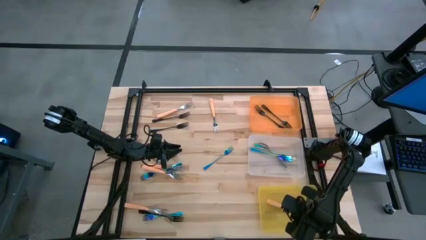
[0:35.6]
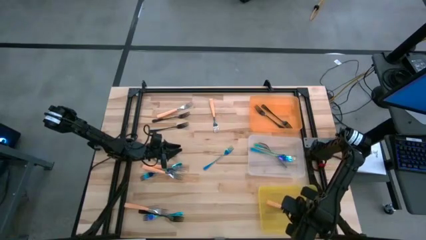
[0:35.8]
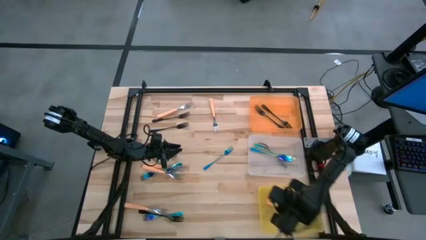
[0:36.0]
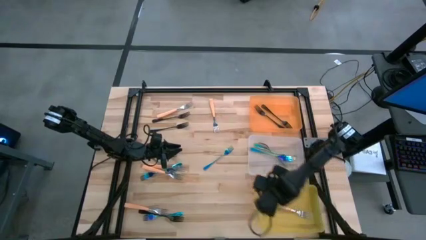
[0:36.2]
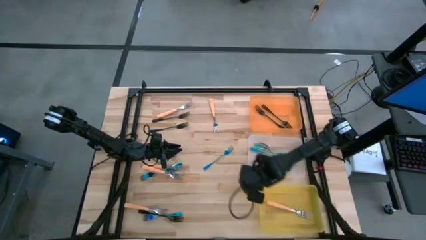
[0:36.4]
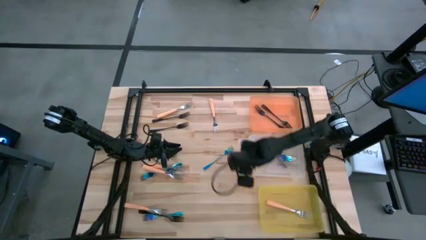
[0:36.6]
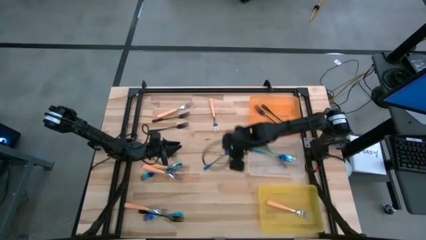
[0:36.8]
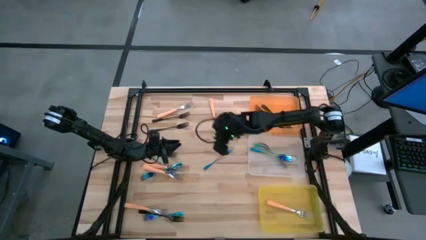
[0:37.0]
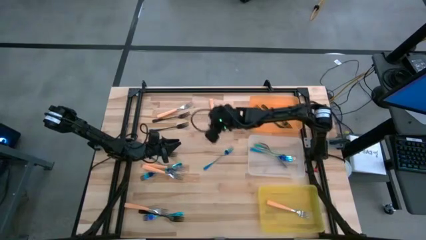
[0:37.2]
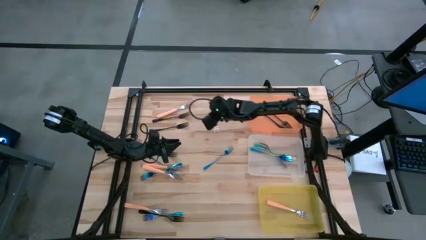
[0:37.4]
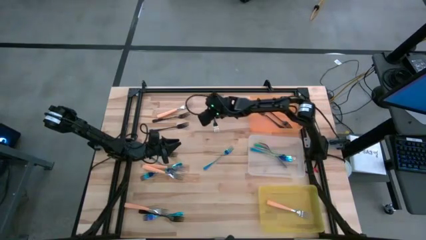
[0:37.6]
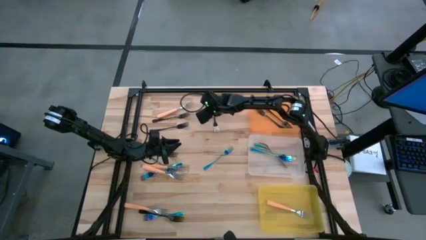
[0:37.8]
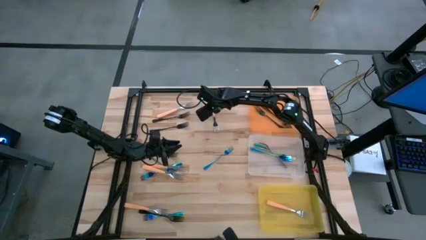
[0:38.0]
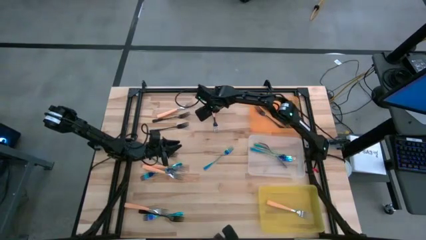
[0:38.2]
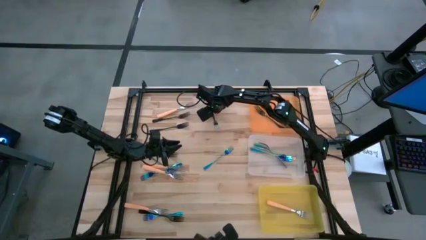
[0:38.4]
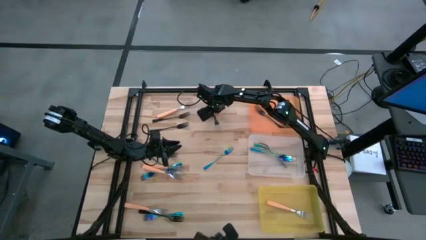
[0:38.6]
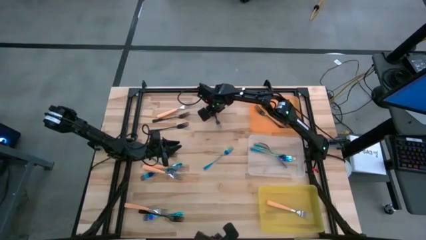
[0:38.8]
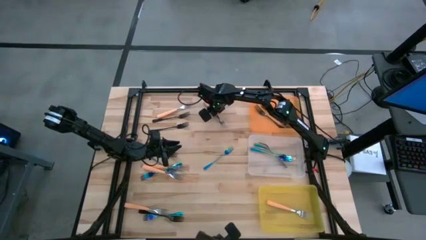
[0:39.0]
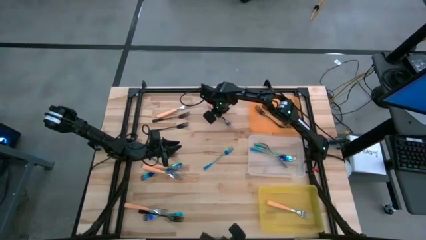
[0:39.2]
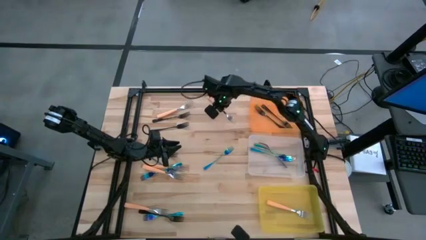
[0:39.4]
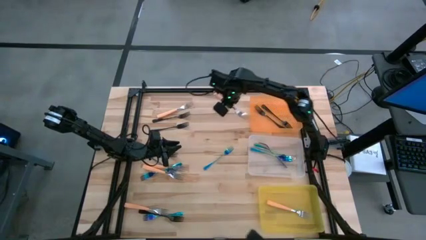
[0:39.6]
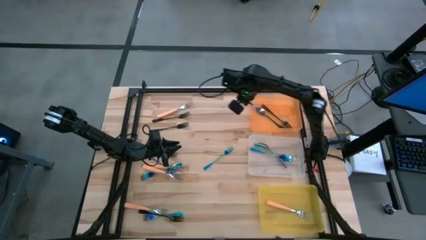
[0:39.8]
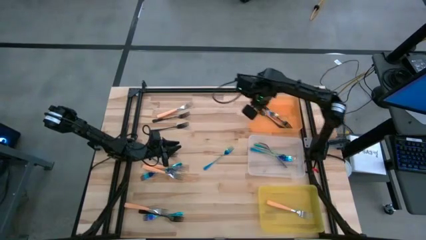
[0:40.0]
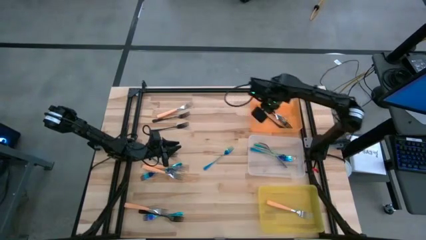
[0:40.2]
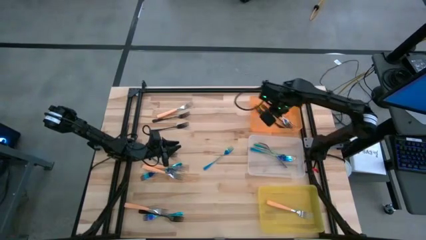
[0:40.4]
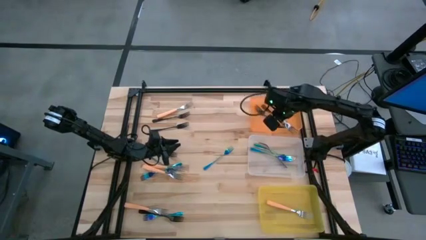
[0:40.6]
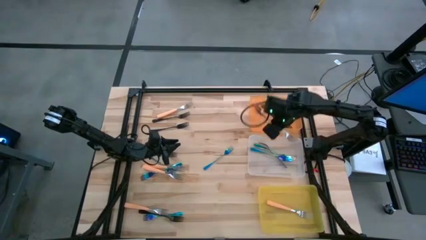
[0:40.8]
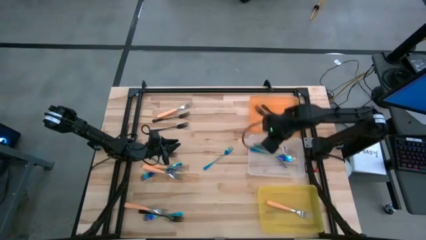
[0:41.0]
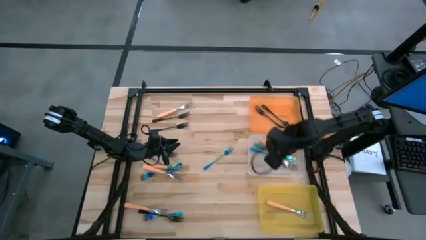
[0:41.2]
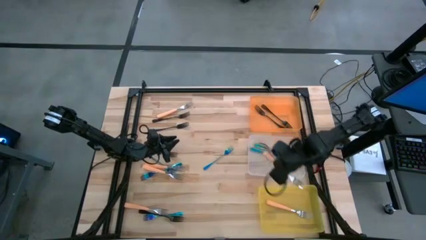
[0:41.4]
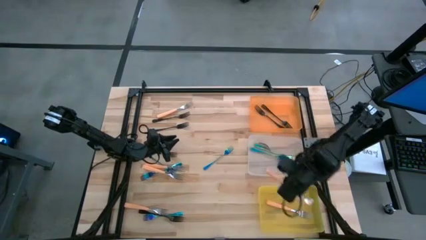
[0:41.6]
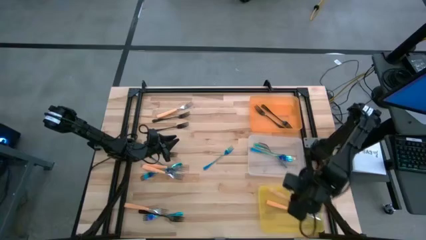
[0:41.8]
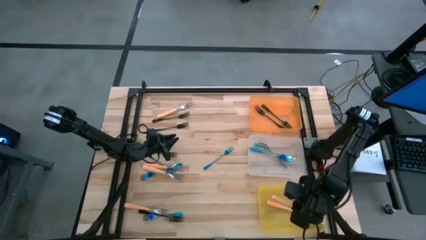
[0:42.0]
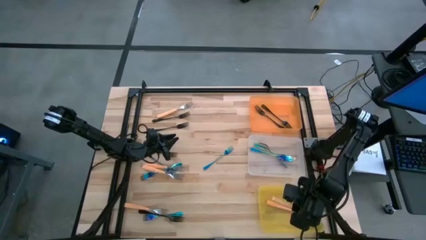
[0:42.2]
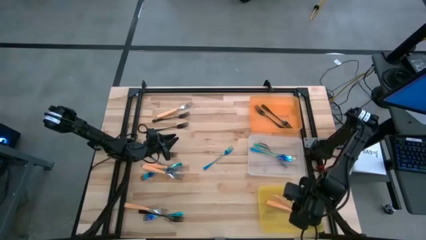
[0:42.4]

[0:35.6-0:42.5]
Task: Sort silverware by color (type)
Put the orange fork into the yellow bin

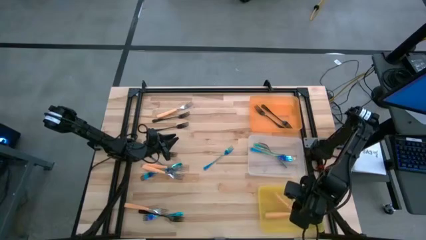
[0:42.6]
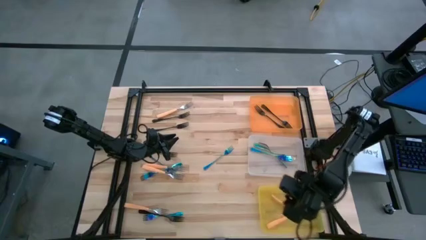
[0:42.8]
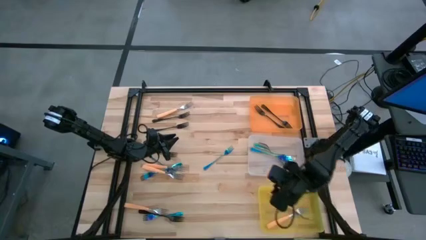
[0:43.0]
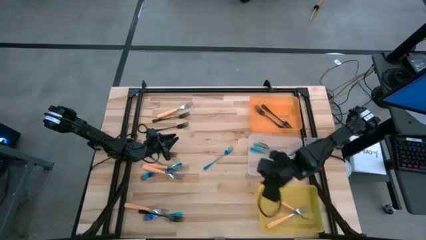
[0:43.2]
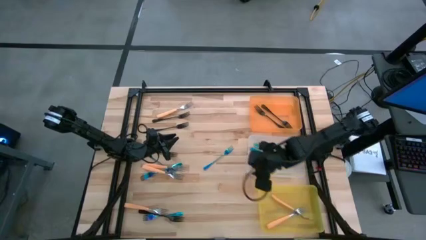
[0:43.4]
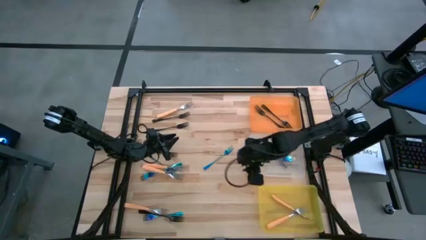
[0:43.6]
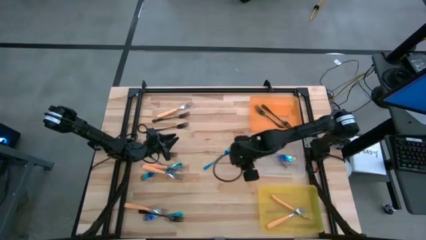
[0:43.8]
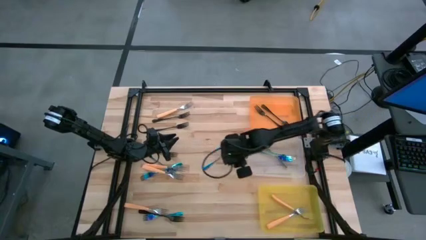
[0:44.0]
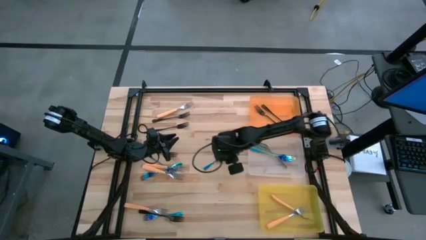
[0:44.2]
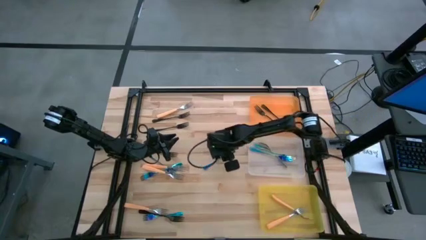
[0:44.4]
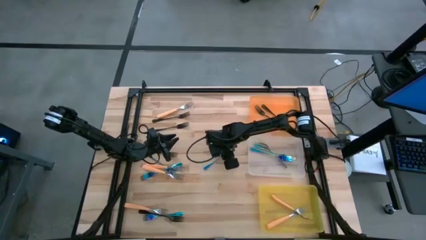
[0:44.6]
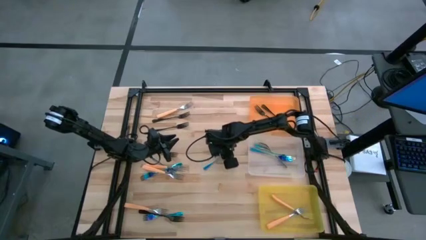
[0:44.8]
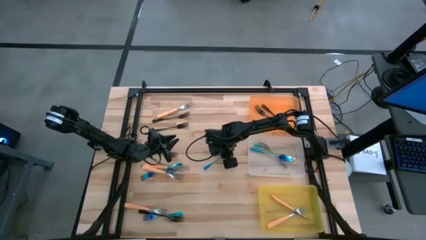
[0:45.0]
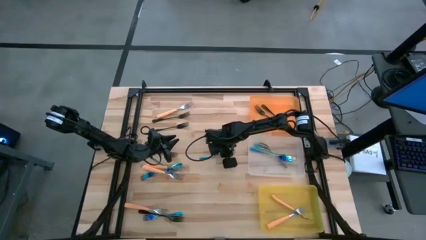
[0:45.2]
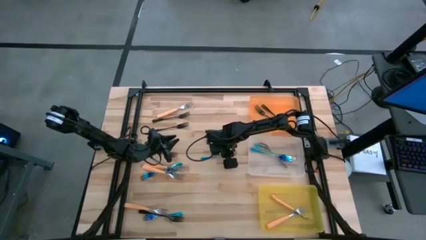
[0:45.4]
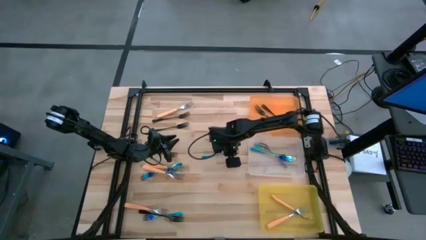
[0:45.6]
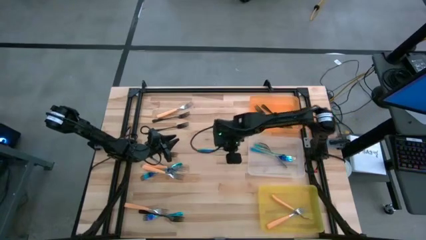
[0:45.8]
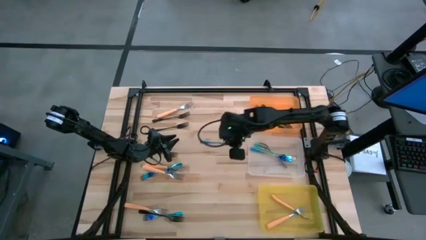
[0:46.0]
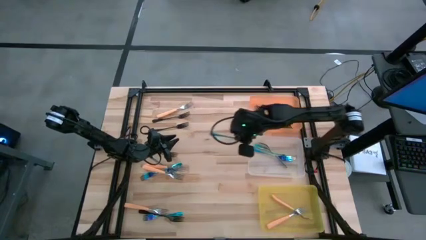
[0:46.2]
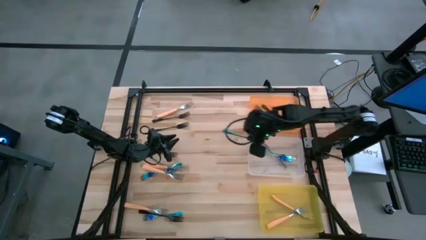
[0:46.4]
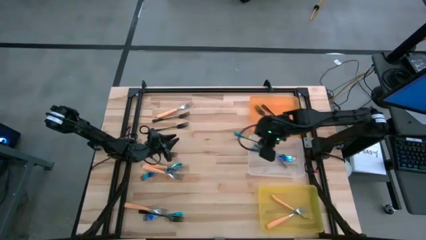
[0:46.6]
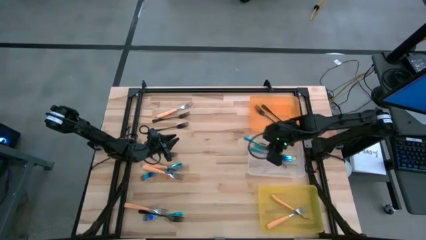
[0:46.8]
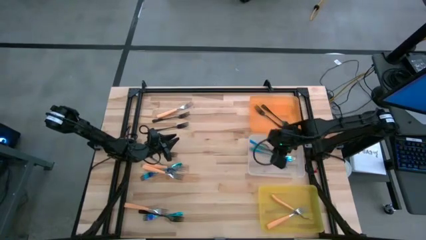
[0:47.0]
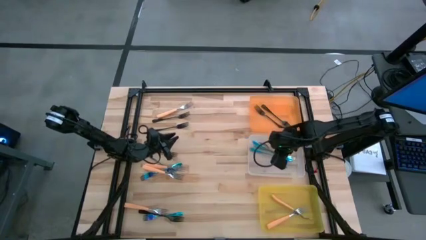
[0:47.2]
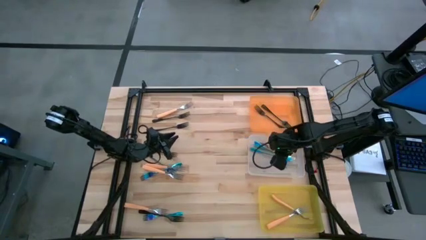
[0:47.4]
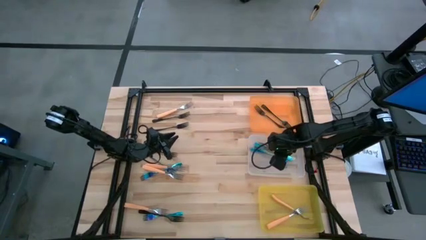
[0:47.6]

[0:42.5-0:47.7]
Put the blue fork into the transparent bin

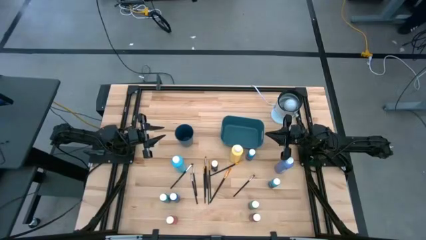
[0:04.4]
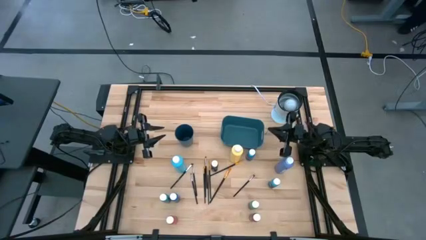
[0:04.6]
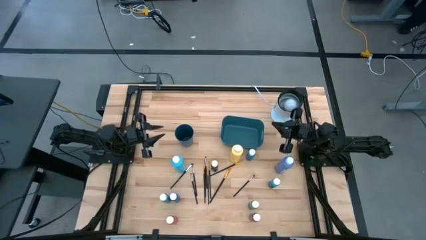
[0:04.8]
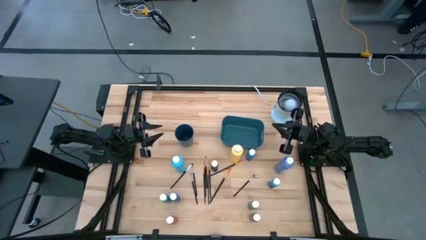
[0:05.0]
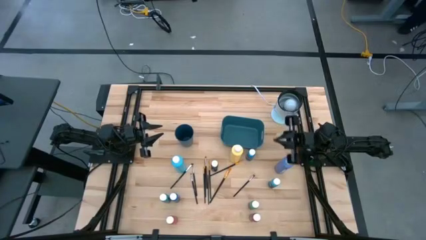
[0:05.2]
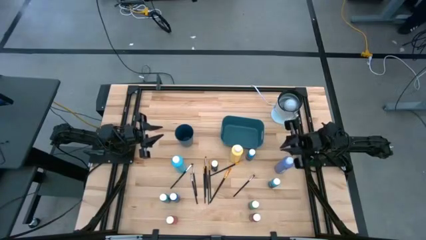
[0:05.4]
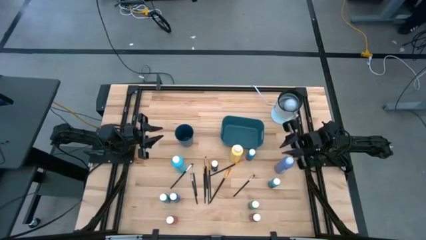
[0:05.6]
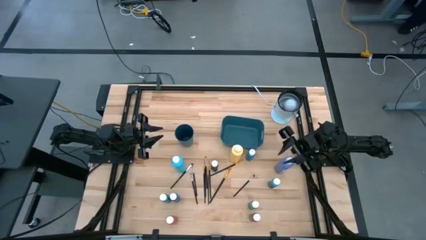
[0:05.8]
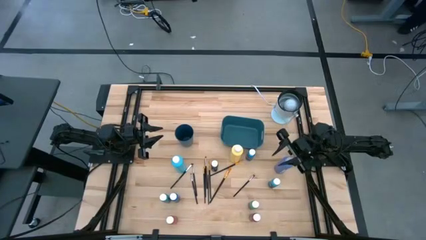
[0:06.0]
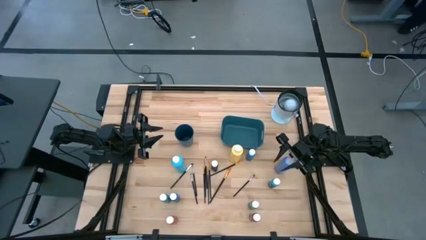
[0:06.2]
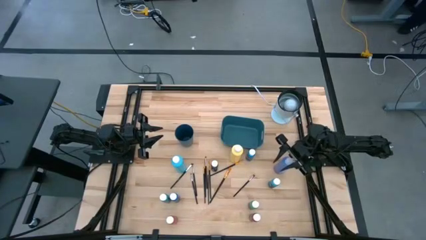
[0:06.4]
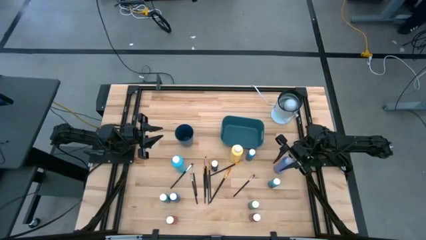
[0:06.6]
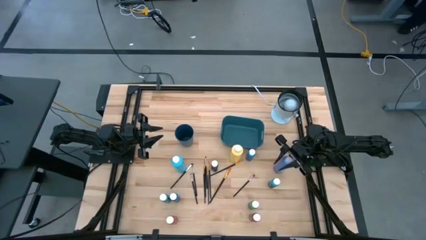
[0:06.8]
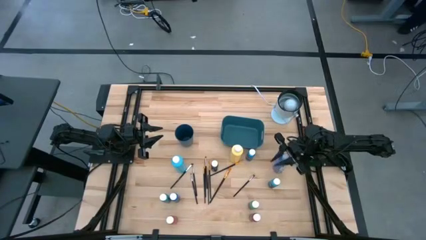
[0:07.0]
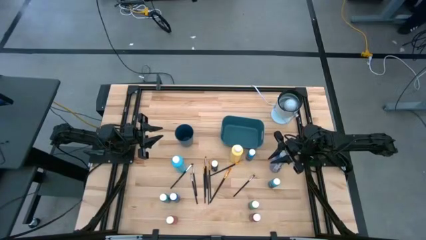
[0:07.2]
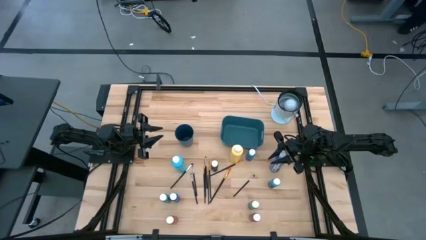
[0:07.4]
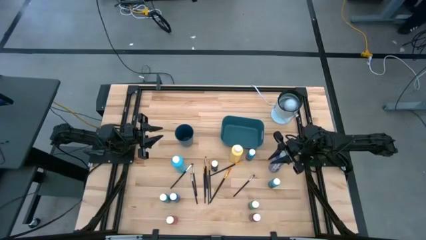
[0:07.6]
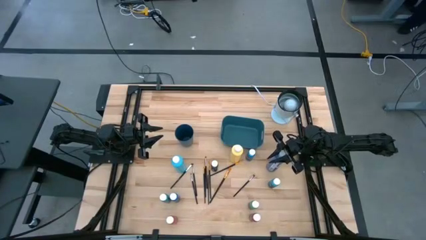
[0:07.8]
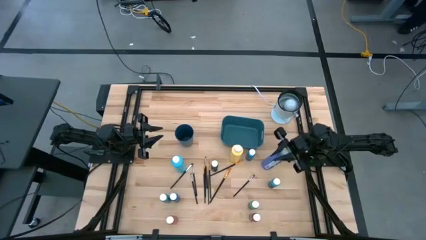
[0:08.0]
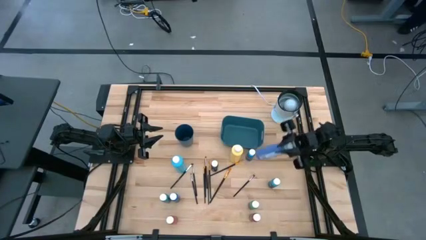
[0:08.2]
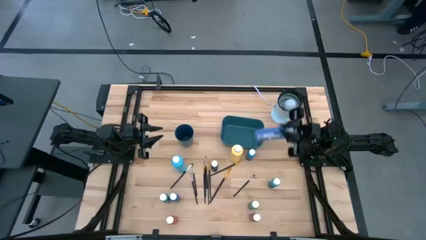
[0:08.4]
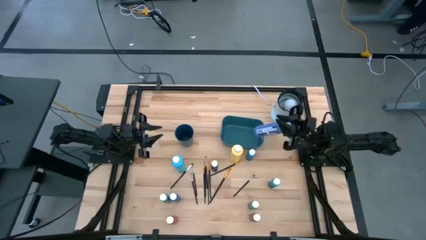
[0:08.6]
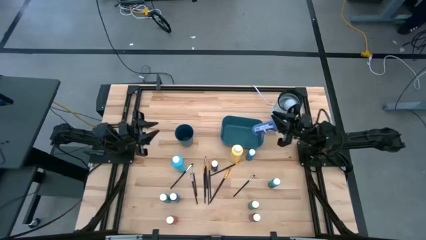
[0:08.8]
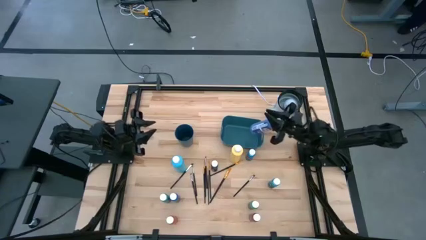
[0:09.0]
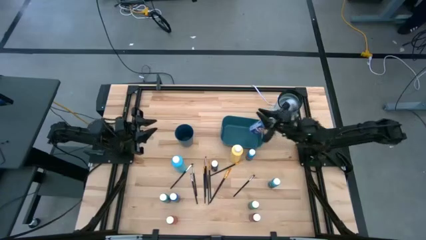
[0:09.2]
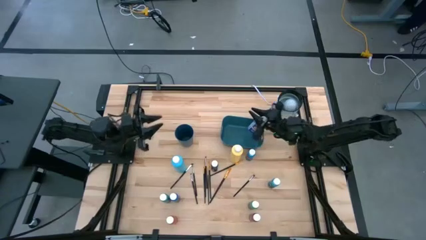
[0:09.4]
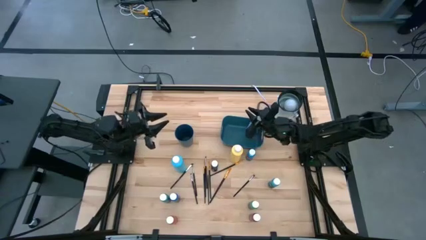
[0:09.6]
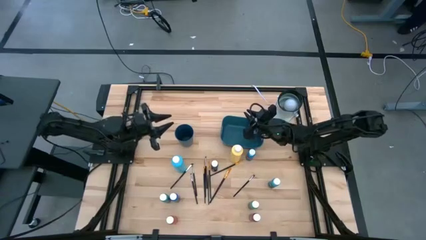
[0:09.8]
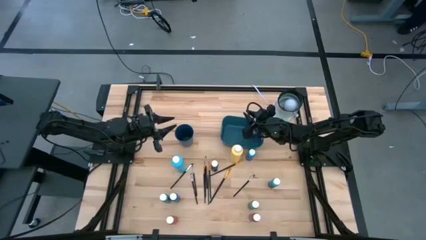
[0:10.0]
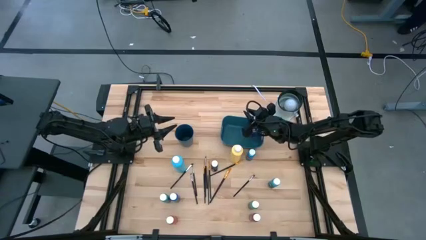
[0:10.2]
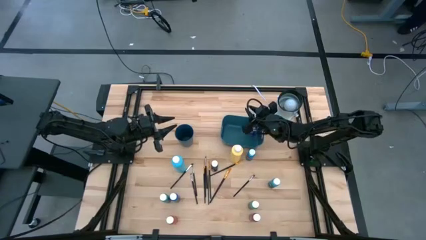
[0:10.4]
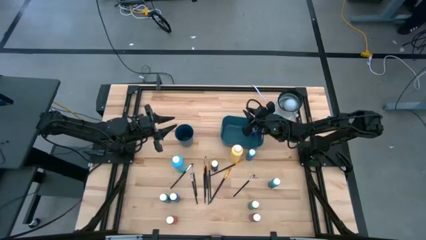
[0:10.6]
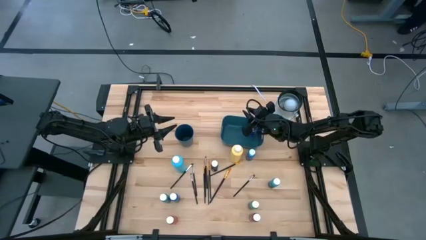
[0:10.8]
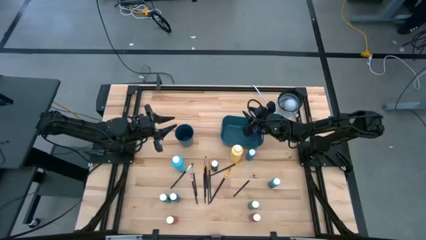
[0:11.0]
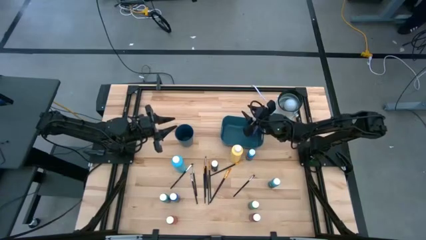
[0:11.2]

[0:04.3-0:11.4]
Task: Pick & Place Paint Supplies
Put the large purple paint bottle into the blue bin
